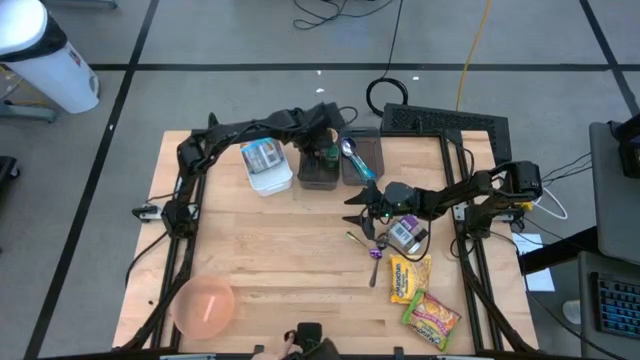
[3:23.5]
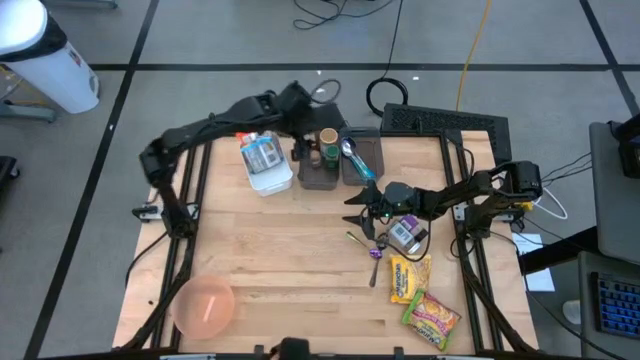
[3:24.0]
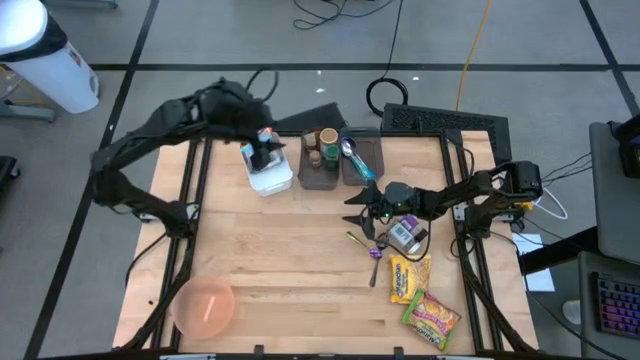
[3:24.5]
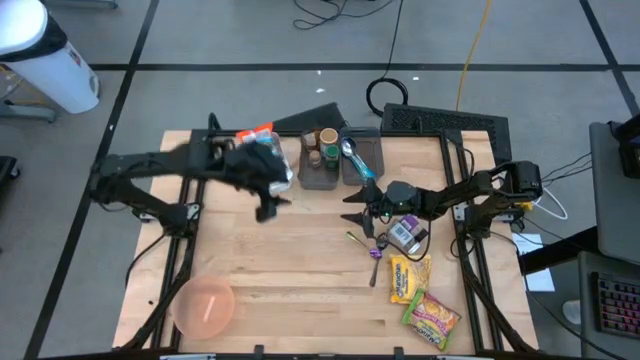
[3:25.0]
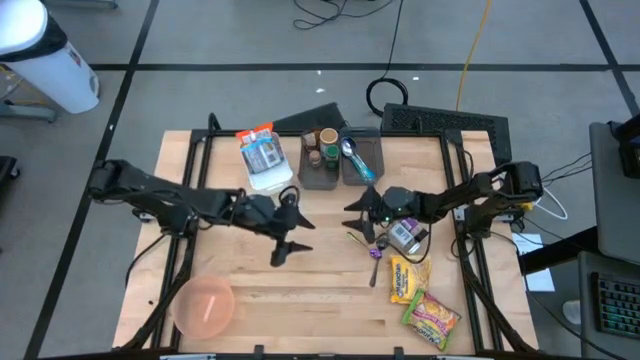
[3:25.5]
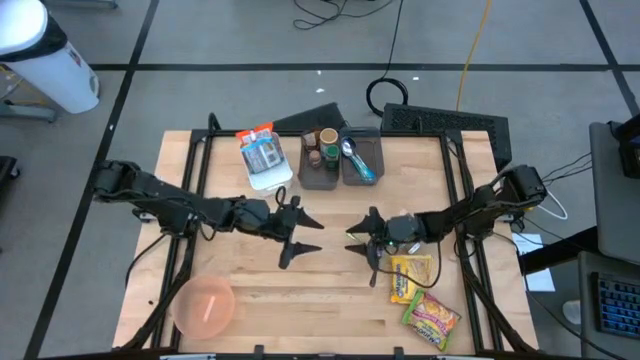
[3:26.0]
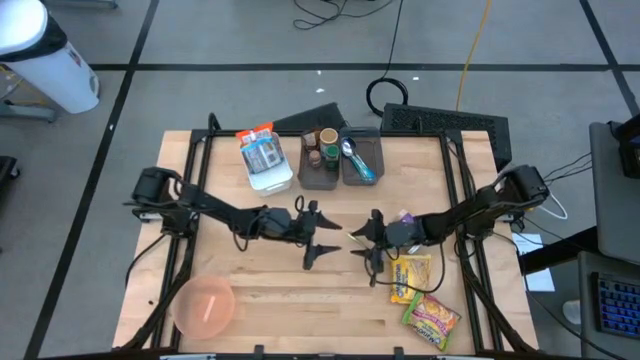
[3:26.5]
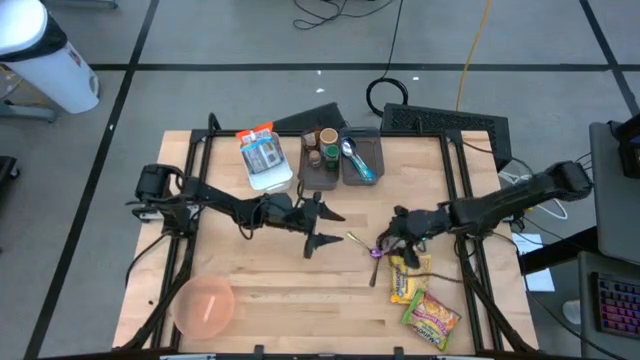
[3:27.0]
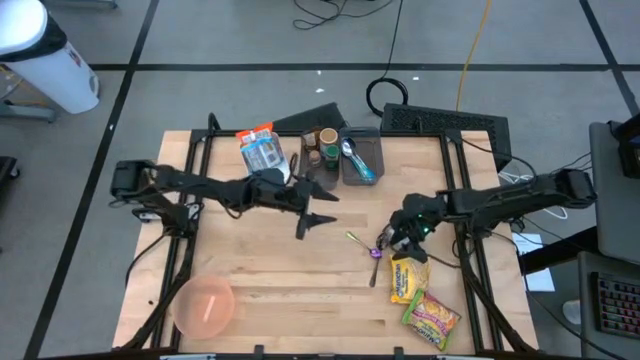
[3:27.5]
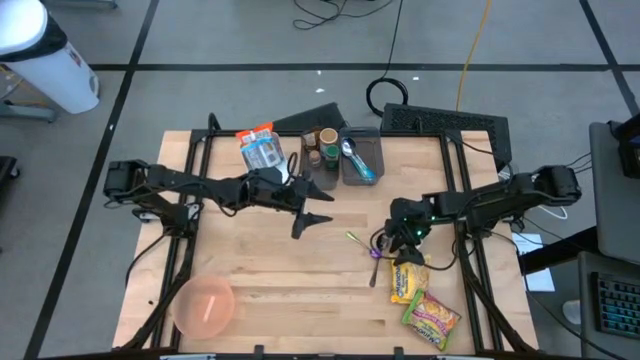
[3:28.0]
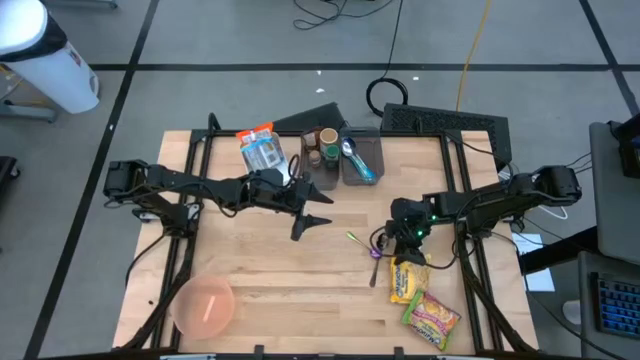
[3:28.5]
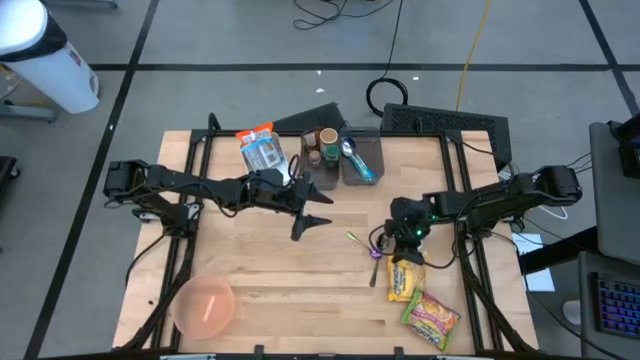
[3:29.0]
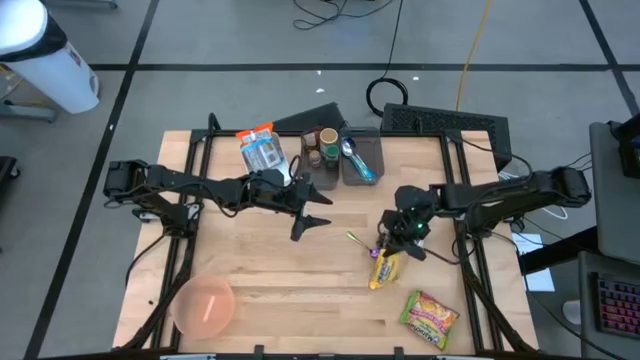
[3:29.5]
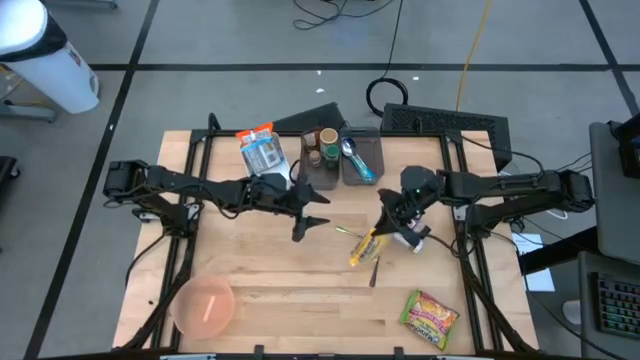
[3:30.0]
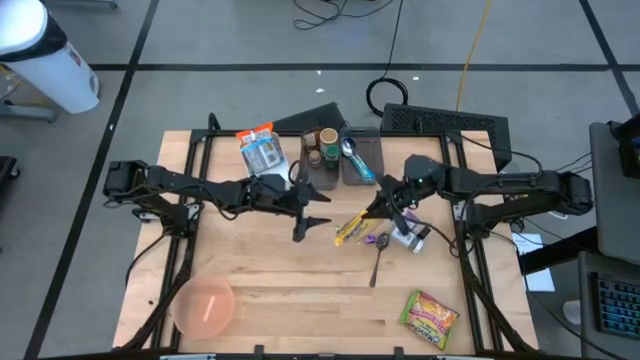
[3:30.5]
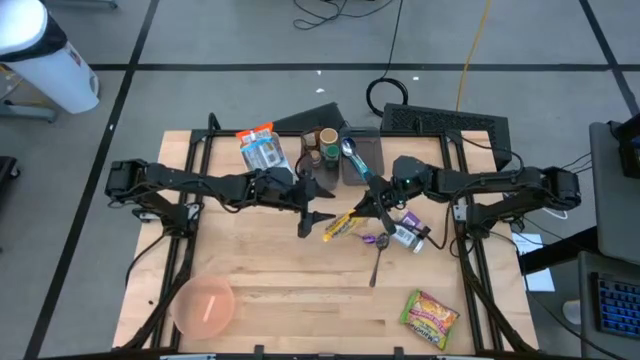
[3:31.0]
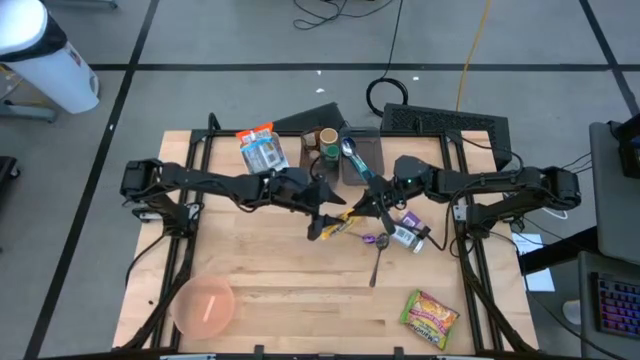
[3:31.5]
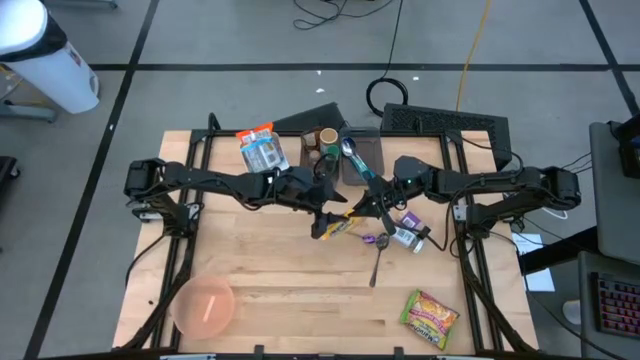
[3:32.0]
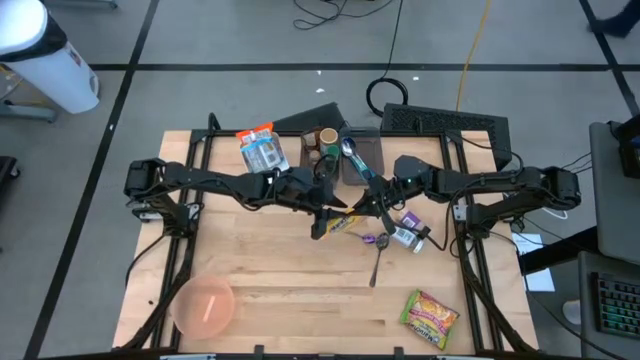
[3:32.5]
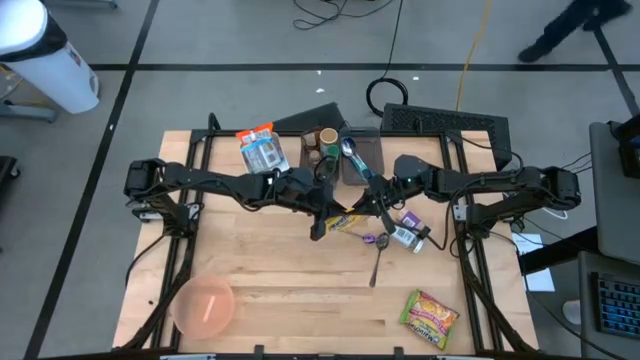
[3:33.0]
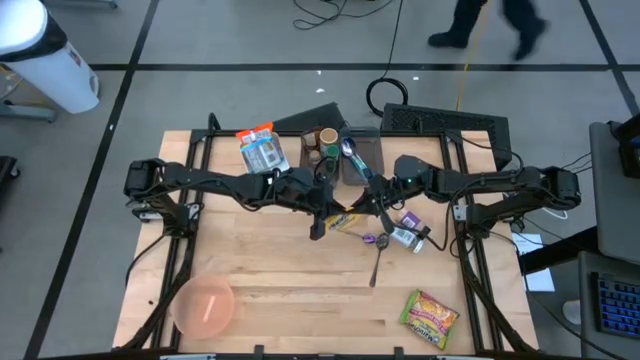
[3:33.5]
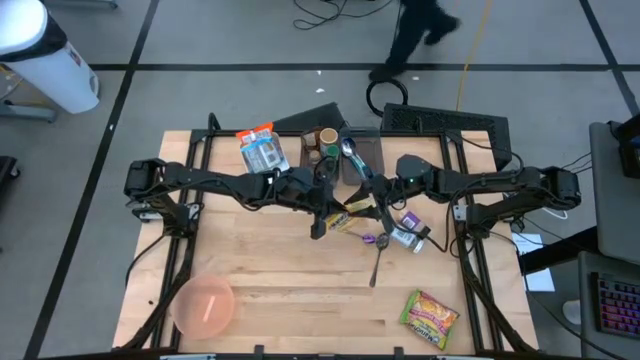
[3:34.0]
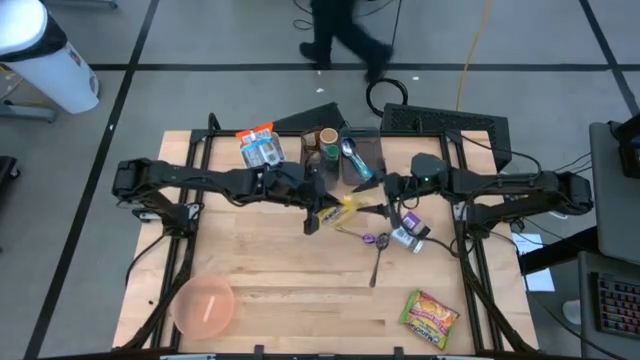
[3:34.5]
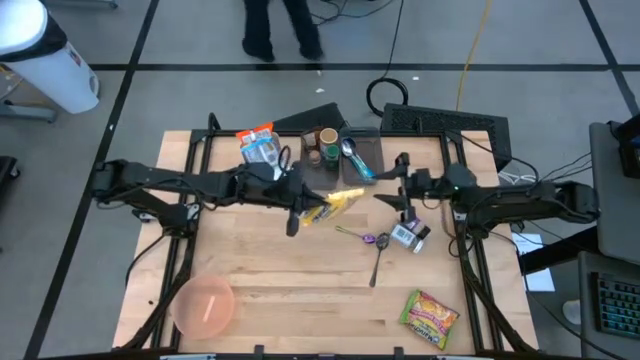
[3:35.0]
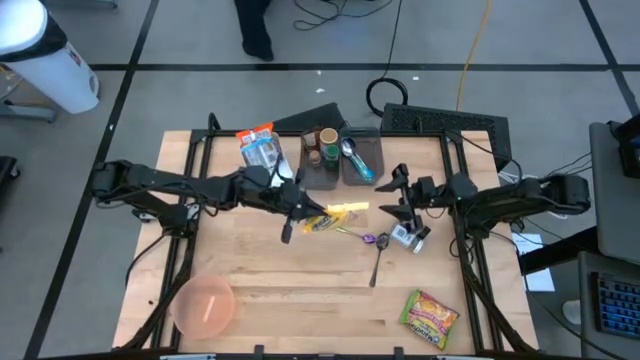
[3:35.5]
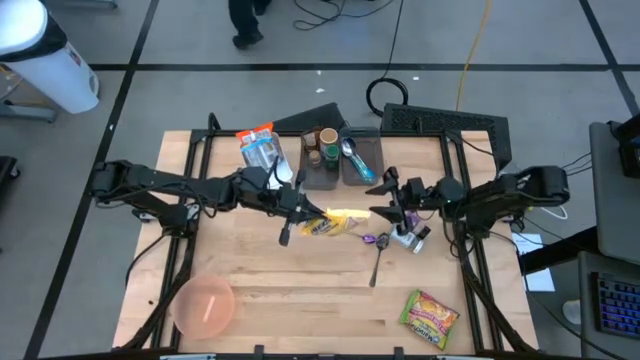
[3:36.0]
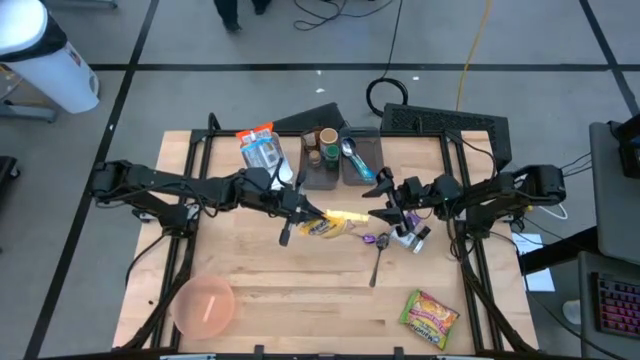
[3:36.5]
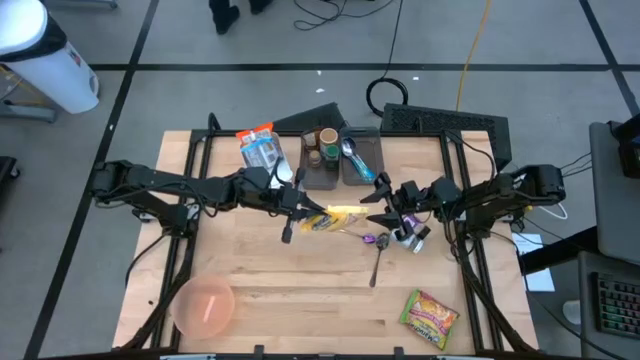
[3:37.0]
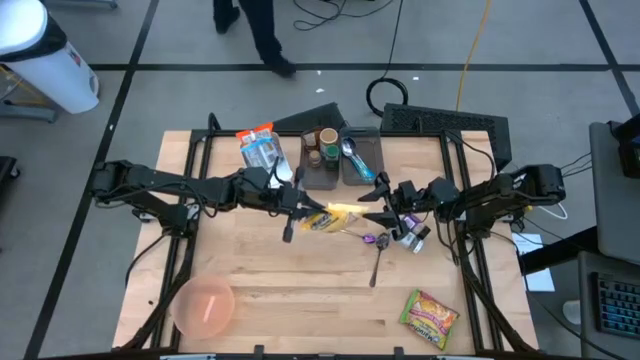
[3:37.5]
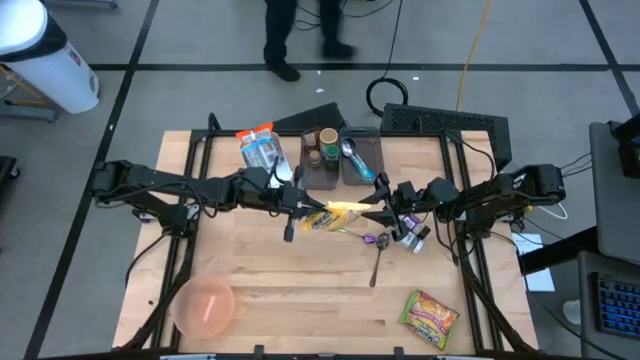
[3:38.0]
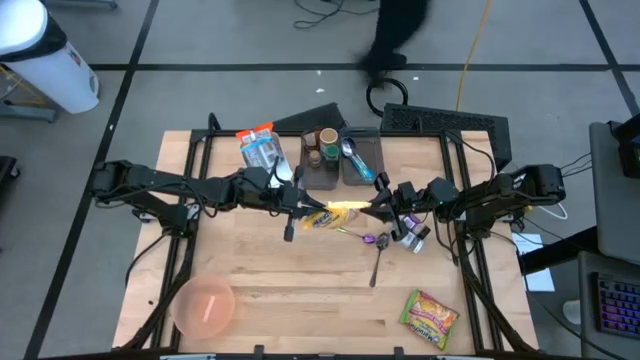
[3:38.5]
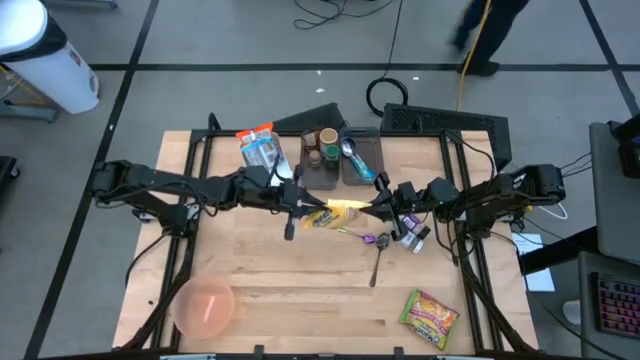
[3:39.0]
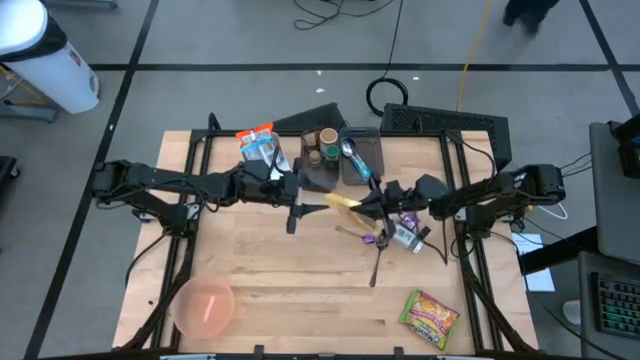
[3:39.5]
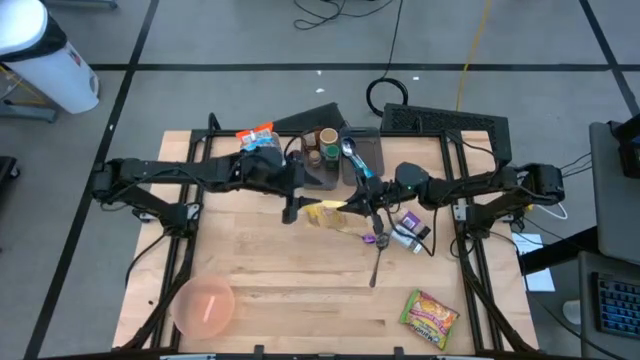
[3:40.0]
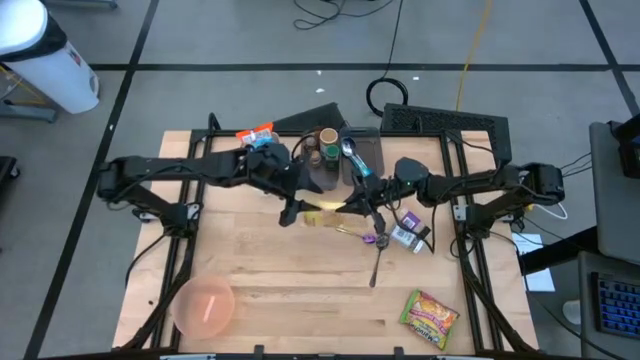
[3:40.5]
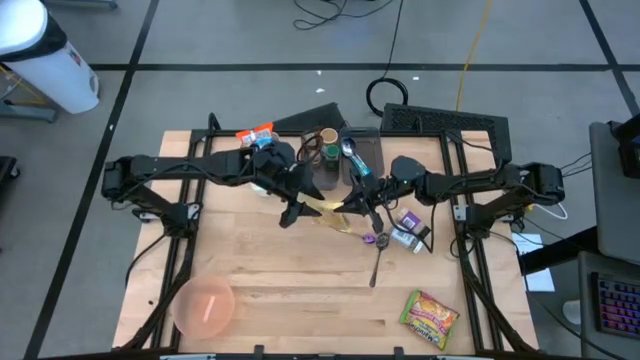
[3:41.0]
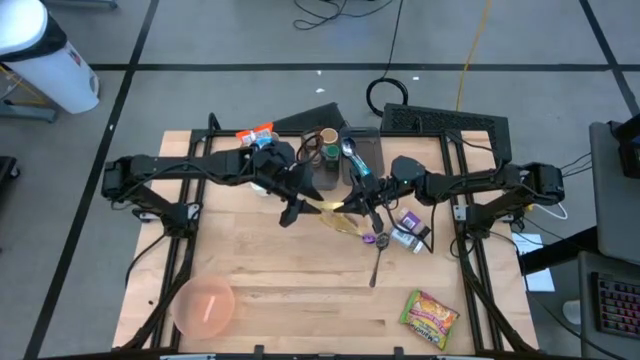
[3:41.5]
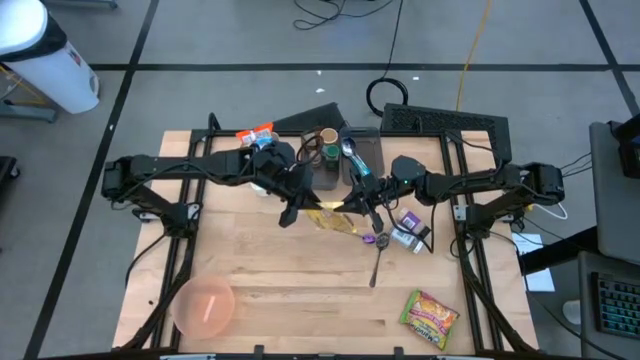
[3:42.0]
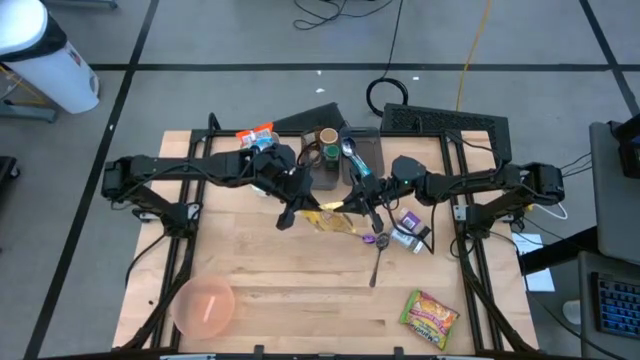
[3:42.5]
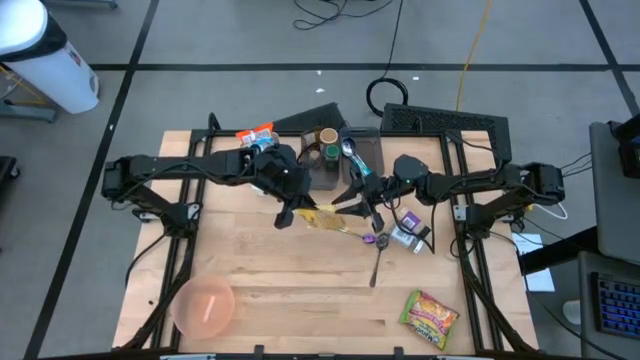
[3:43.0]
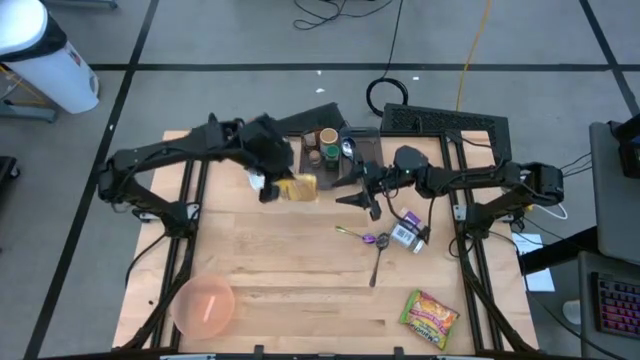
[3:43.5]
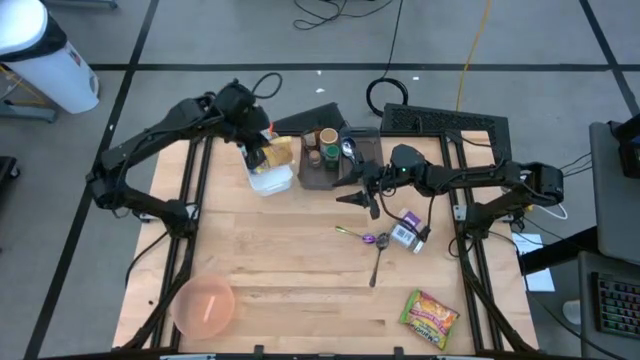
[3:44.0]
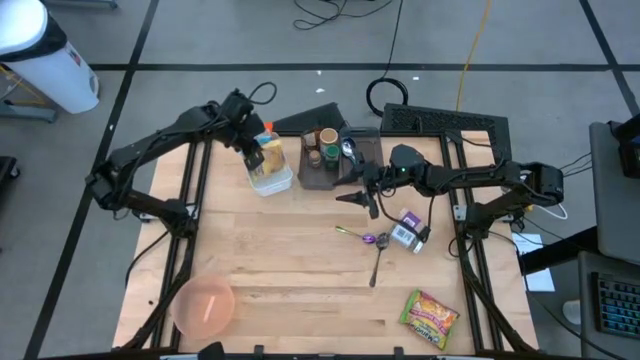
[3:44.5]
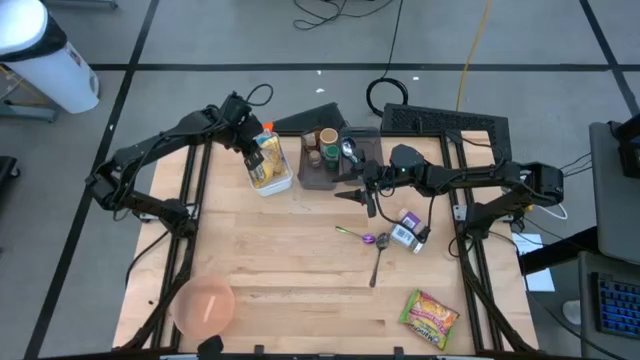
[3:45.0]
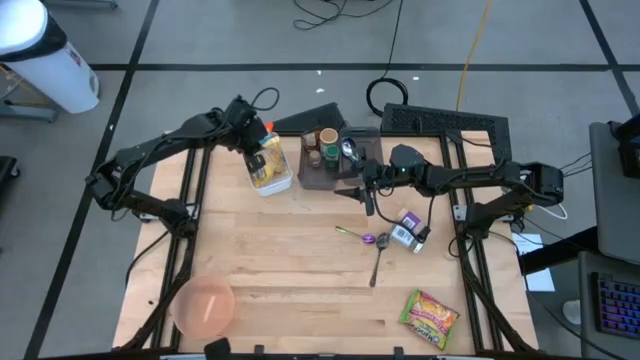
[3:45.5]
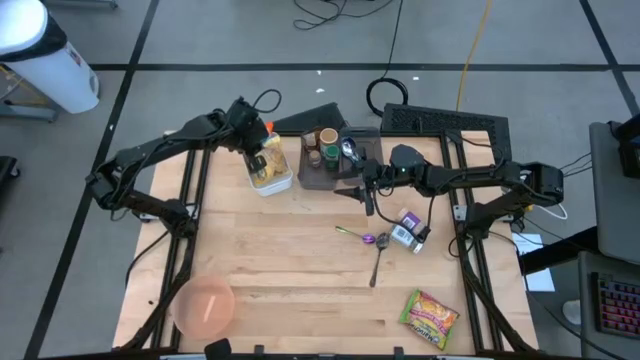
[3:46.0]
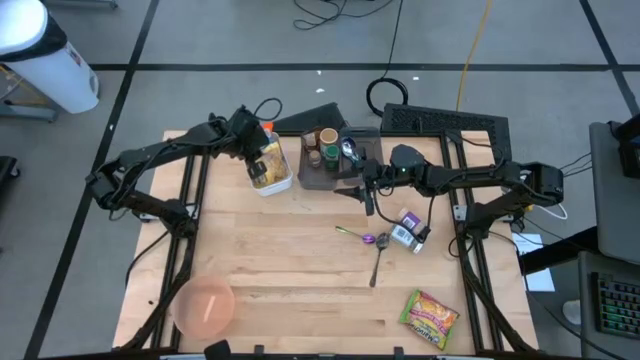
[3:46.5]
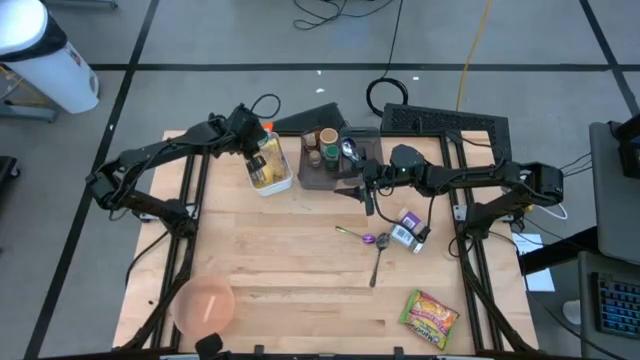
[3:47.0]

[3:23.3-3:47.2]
Task: Pick & Place Food Item
Put the yellow noodle pack into the white bin
